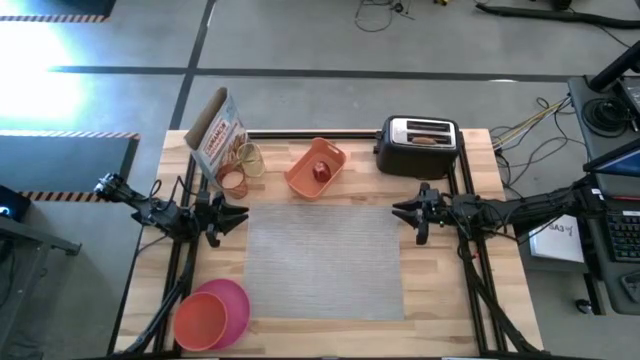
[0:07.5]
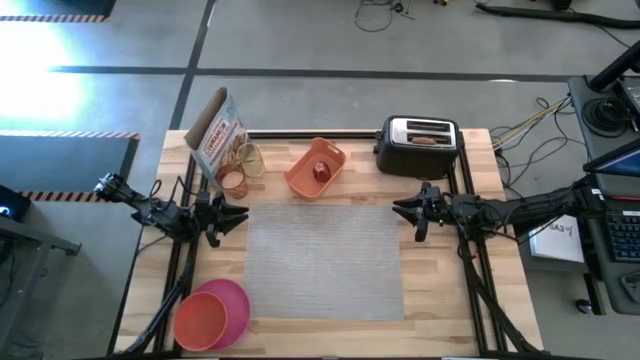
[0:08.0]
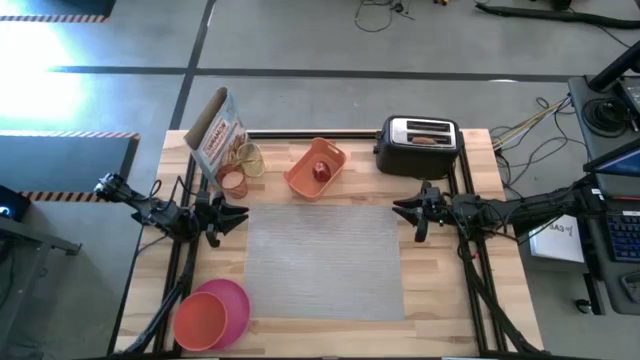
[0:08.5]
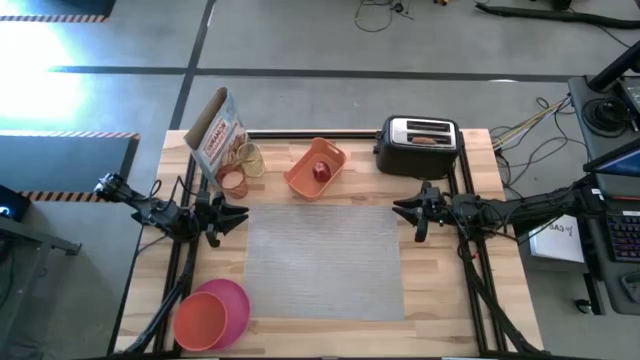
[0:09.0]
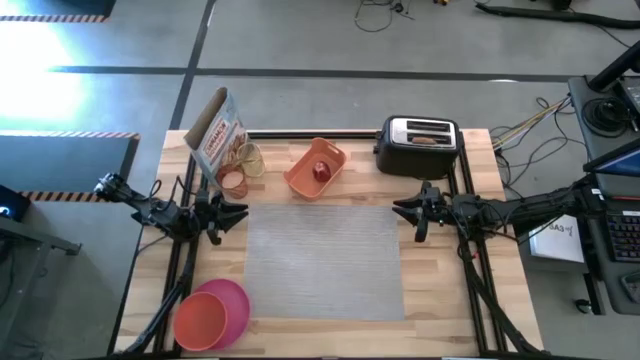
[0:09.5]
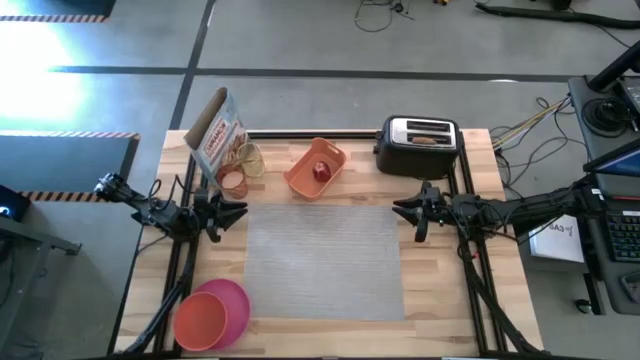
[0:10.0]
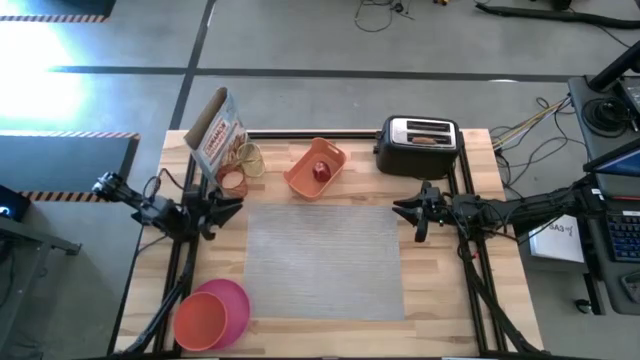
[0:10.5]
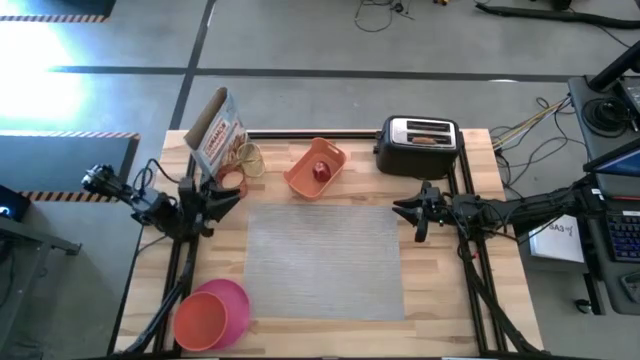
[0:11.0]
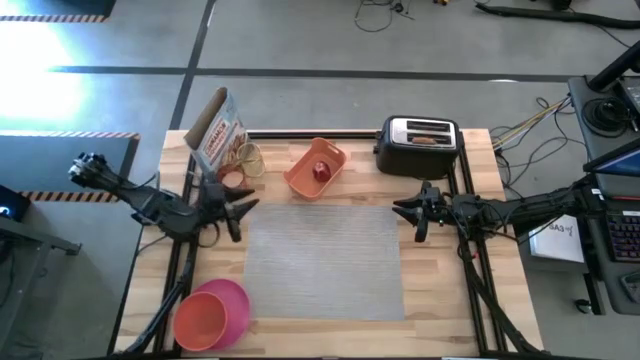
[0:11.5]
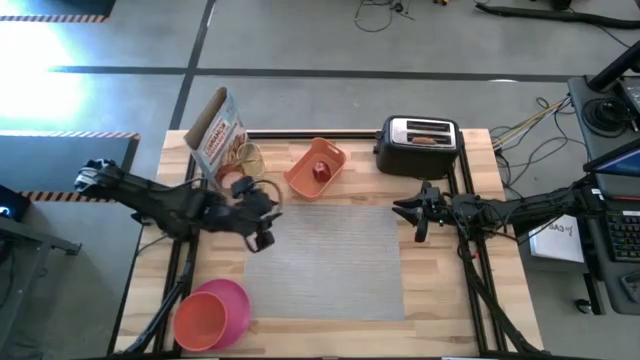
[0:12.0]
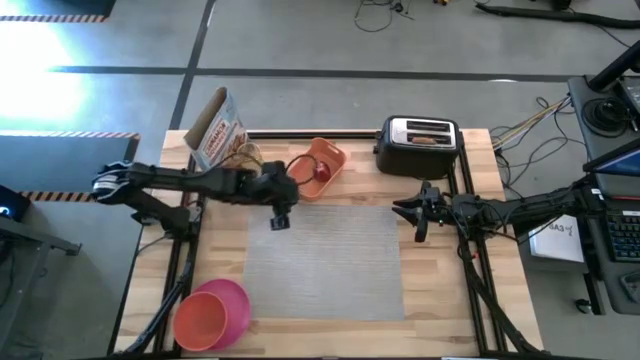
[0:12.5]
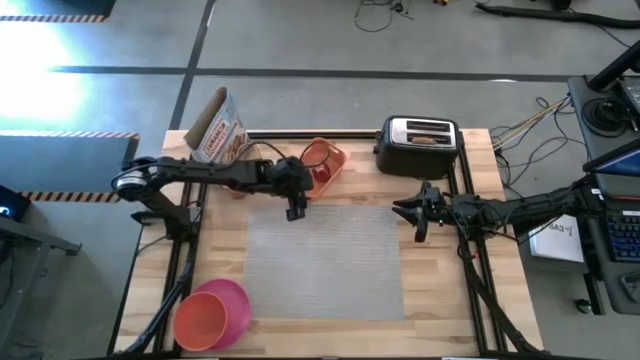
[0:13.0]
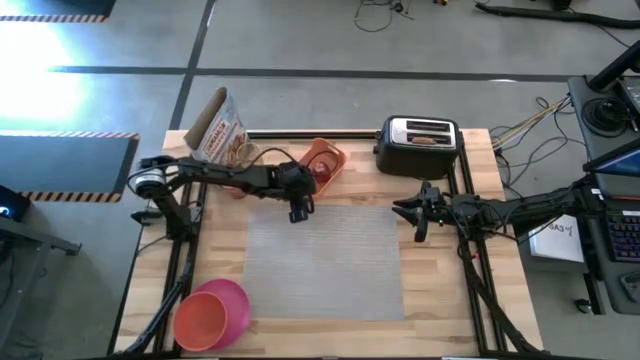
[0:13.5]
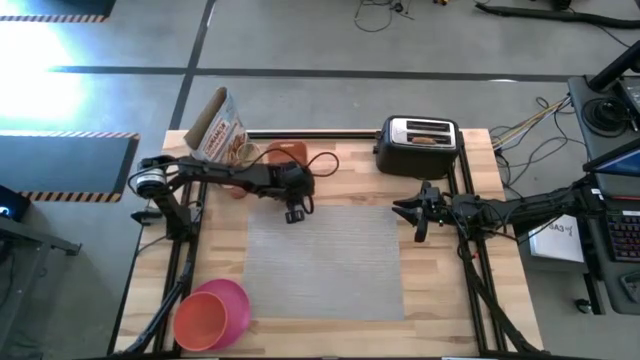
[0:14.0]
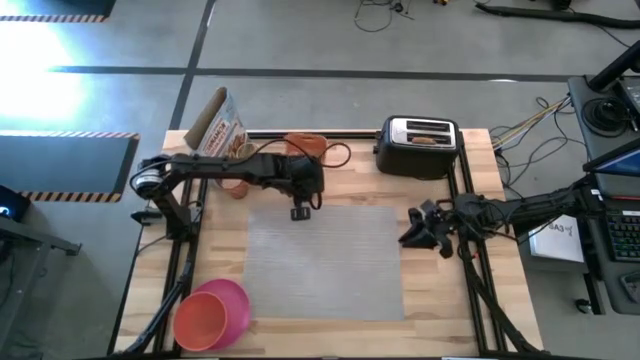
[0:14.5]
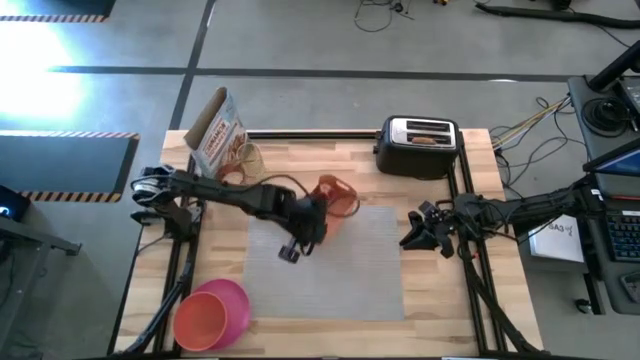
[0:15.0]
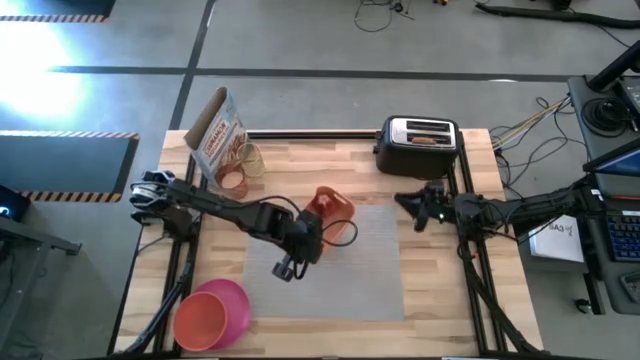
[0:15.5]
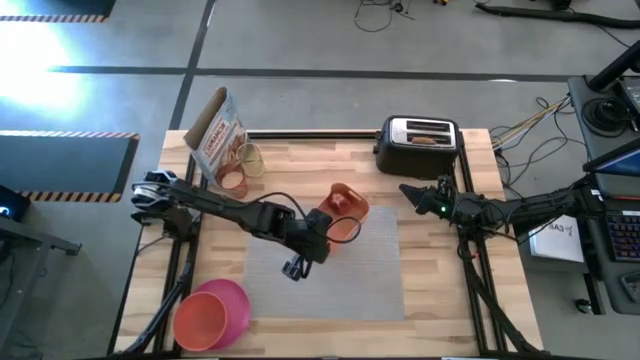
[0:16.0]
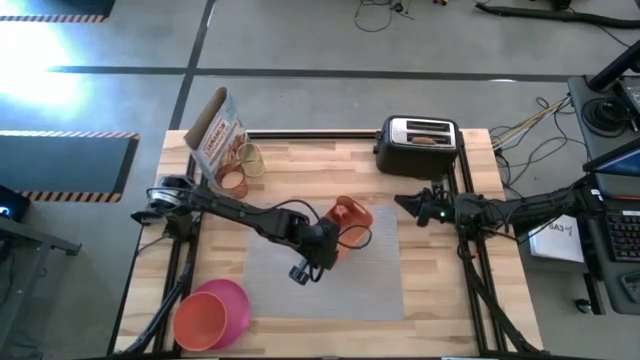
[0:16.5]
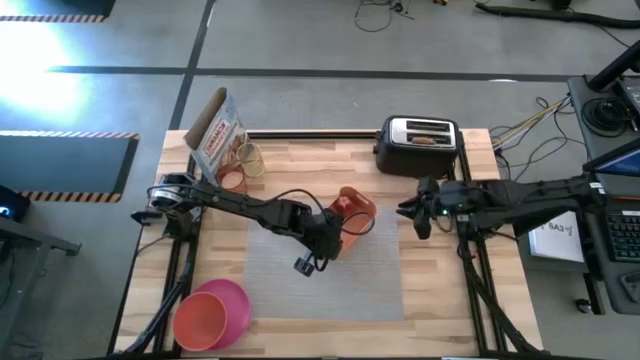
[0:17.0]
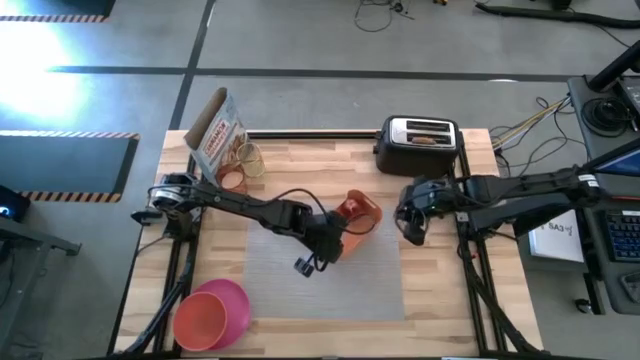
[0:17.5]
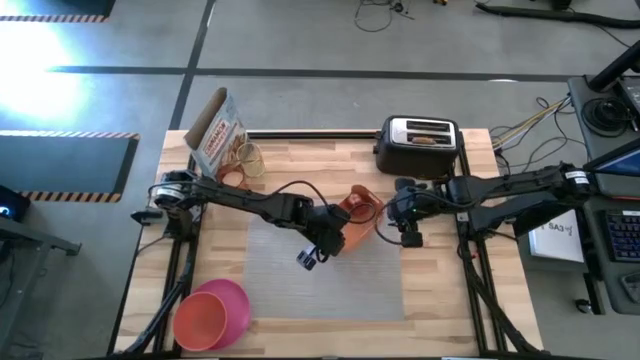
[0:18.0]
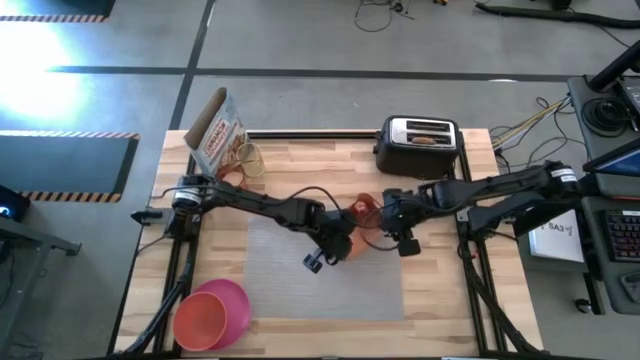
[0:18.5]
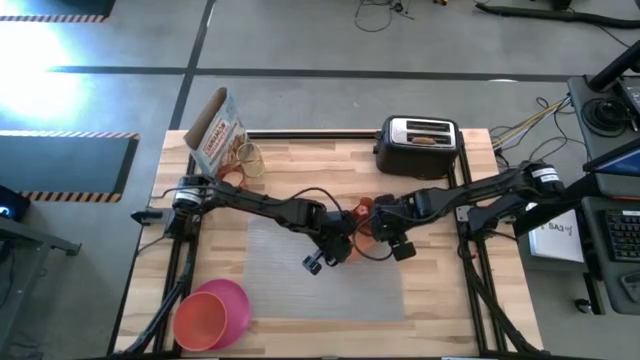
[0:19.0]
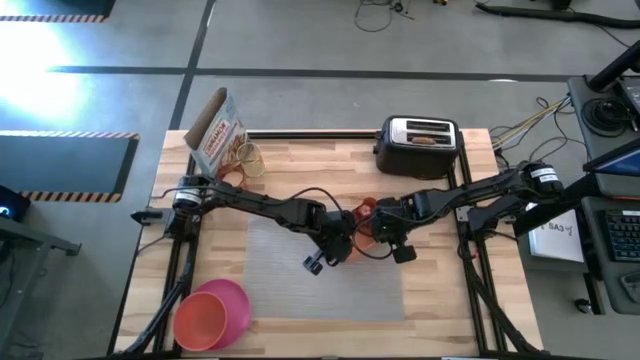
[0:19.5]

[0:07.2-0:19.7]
Task: Arrange a breakfast setting
Move the orange bin to the bottom right of the table

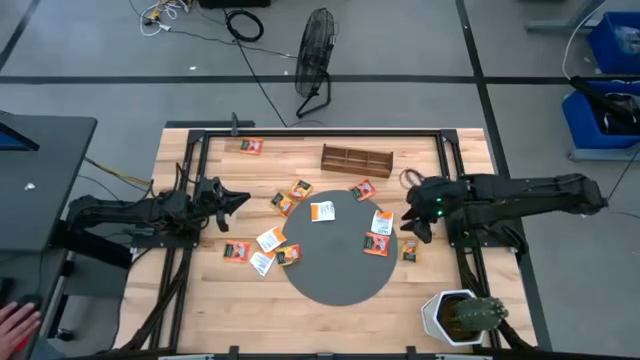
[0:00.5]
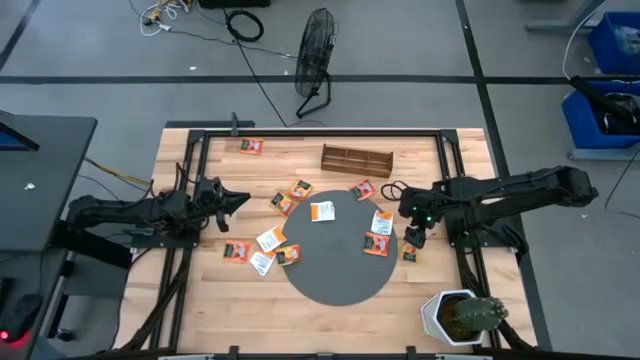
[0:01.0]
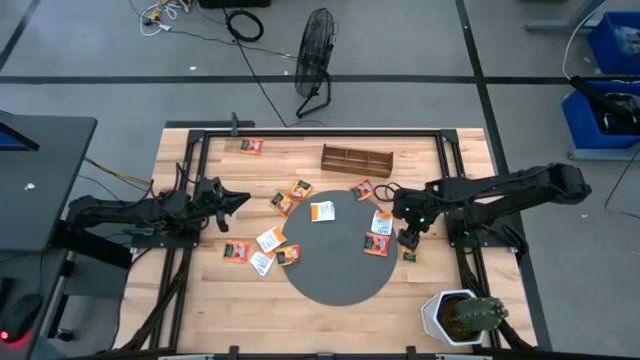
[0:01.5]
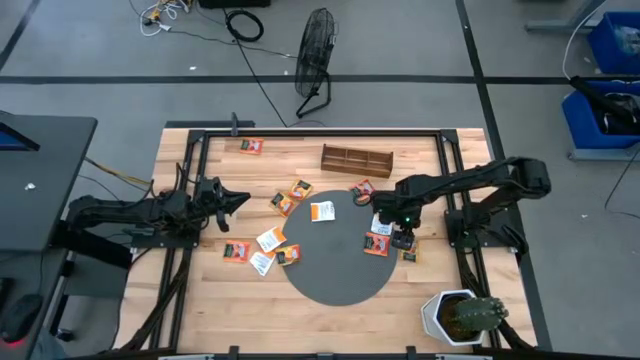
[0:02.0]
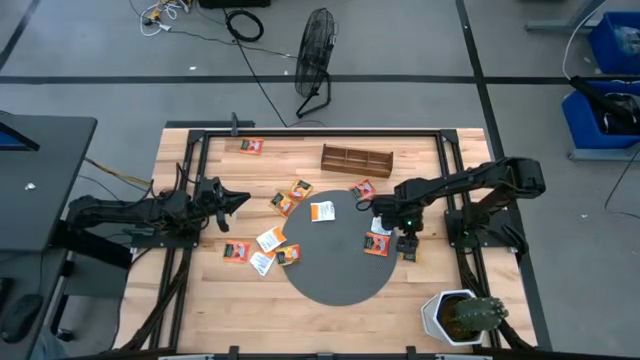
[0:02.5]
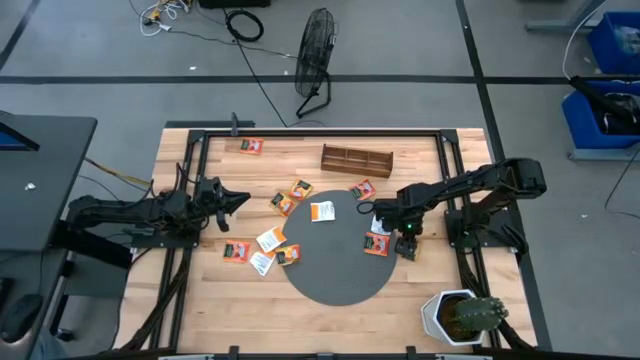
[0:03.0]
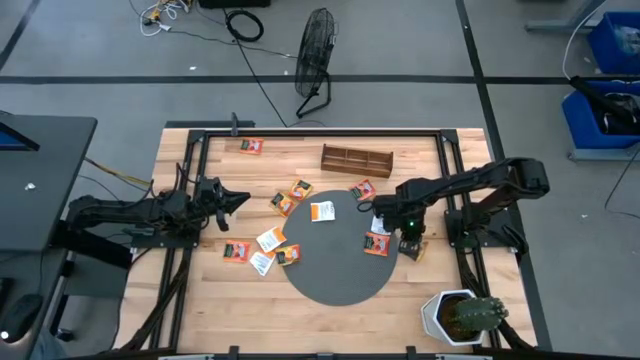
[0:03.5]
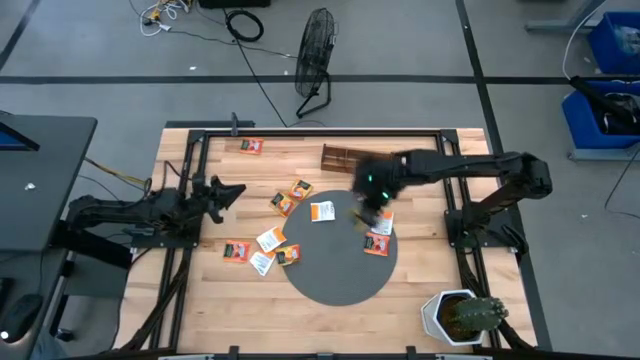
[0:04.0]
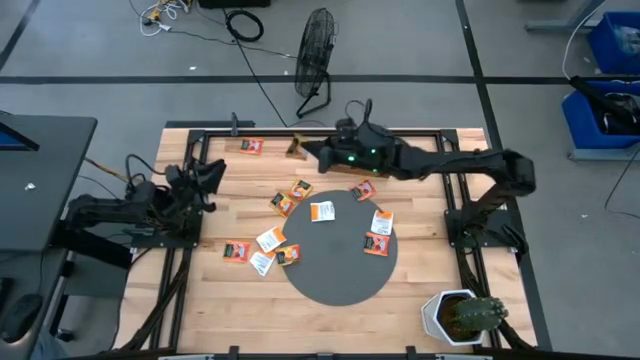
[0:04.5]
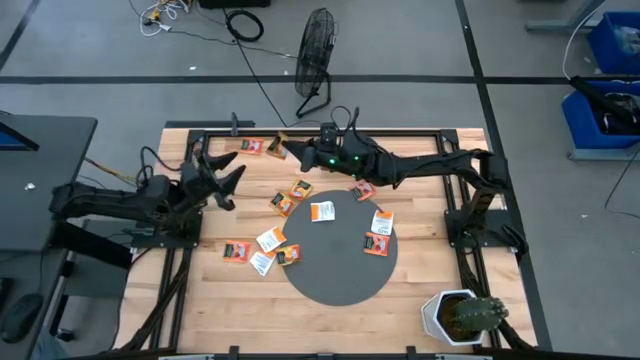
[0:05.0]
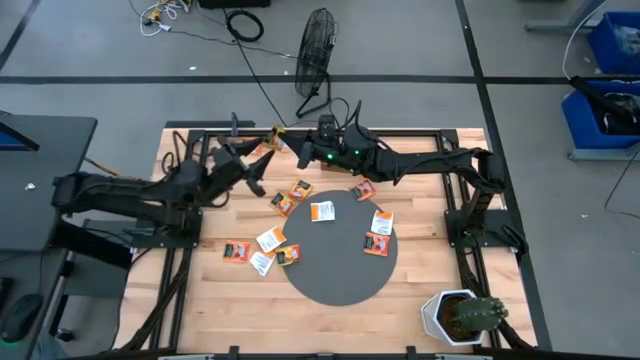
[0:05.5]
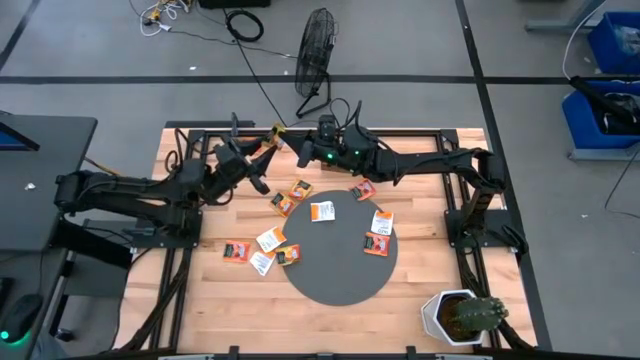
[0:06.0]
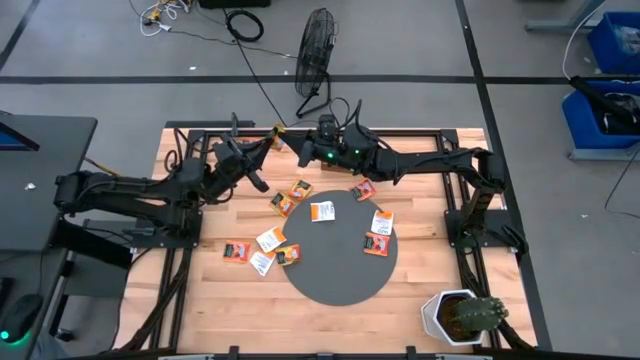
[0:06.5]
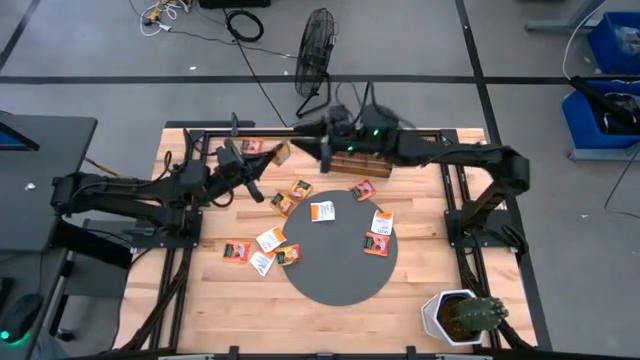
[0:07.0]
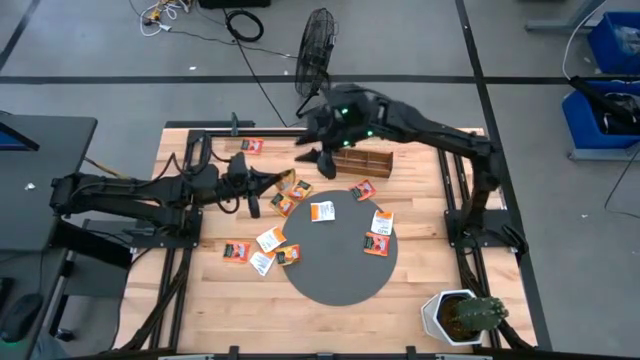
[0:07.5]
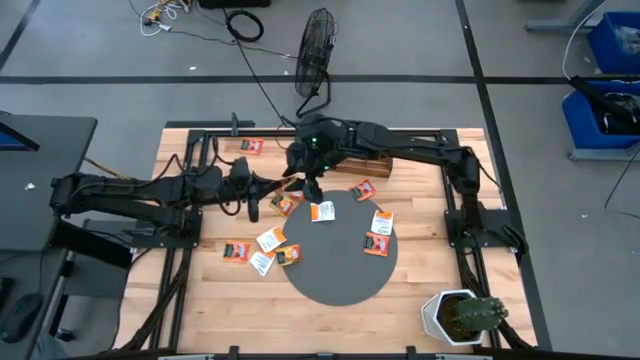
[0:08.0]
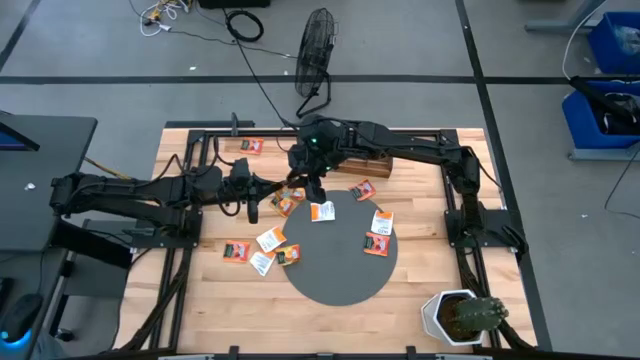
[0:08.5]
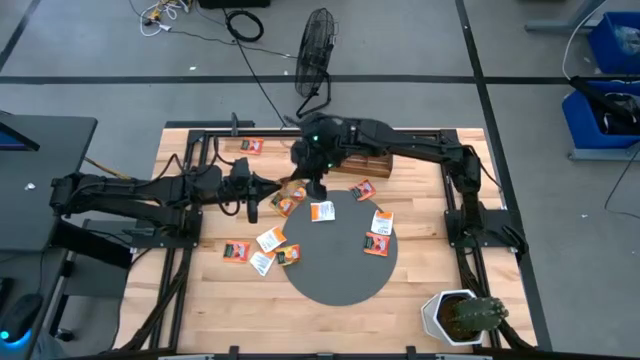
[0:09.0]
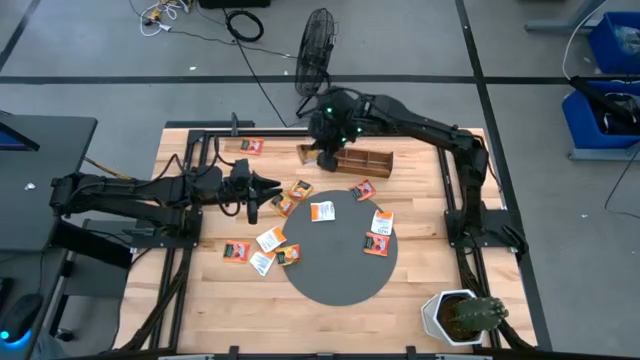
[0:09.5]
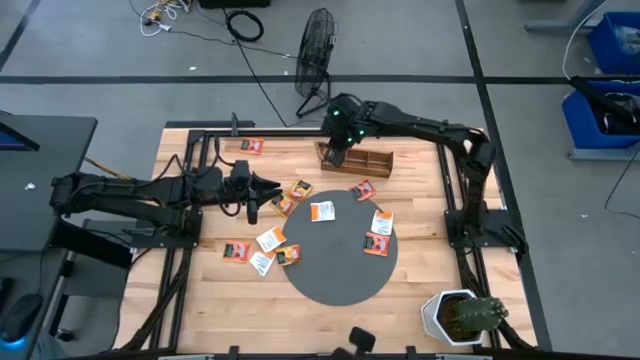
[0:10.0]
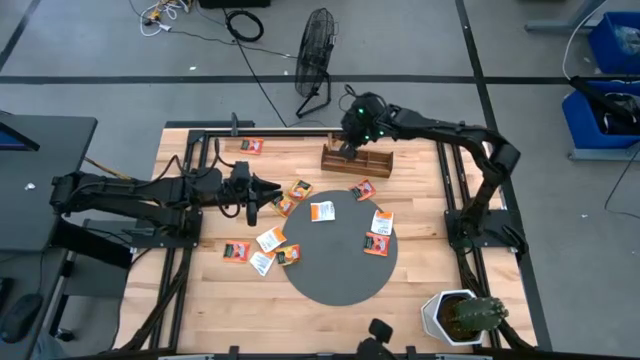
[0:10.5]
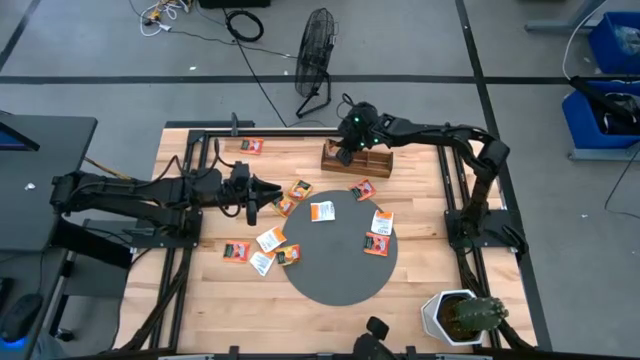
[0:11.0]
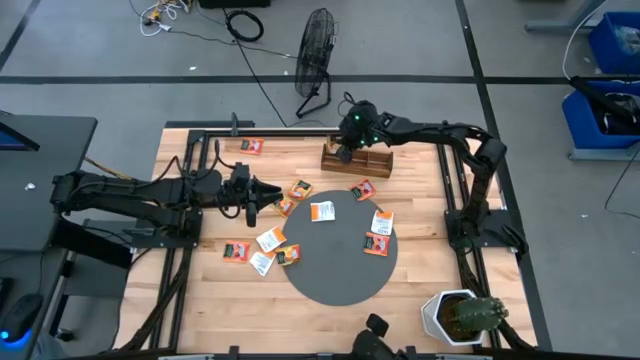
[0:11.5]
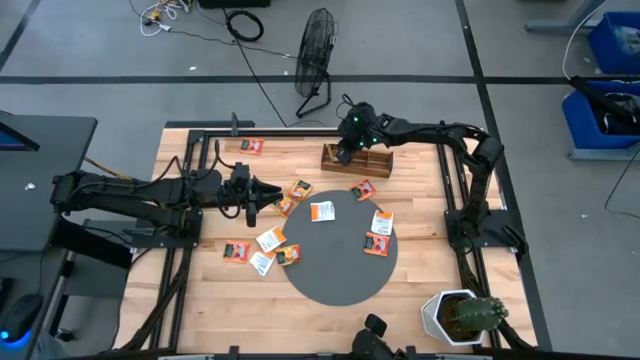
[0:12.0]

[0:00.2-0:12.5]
Task: Pick & Place Tea
Put the yellow tea bag into the left section of the wooden organizer
